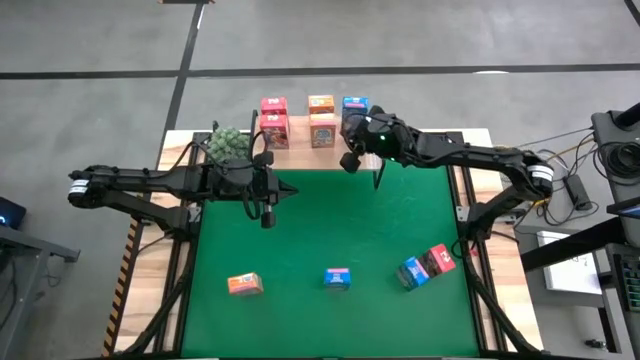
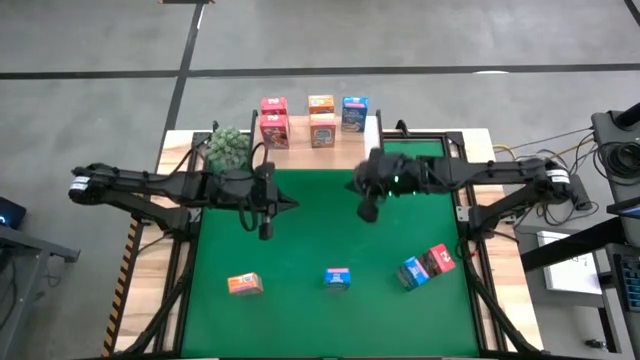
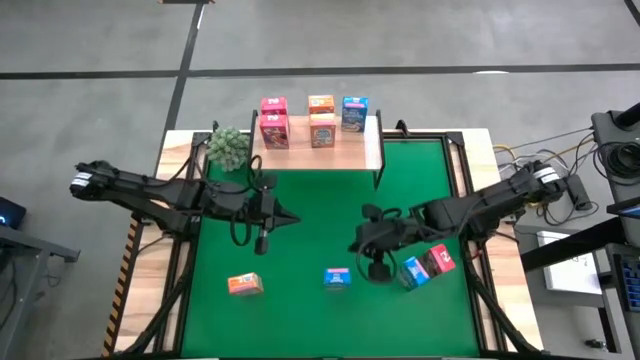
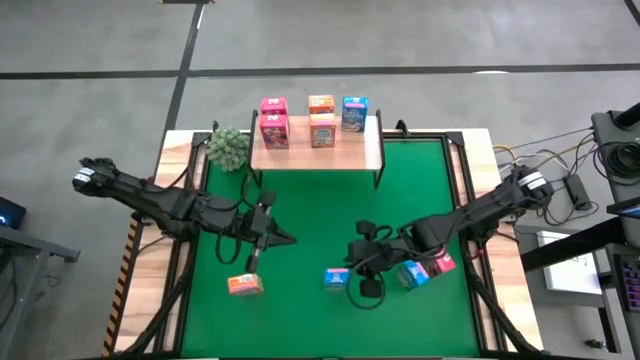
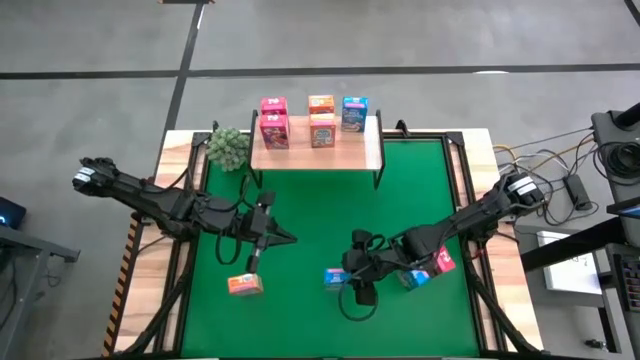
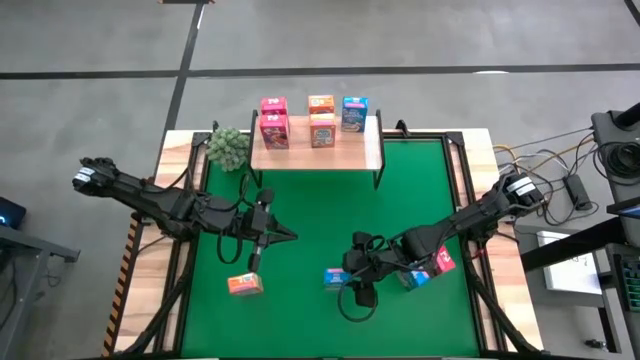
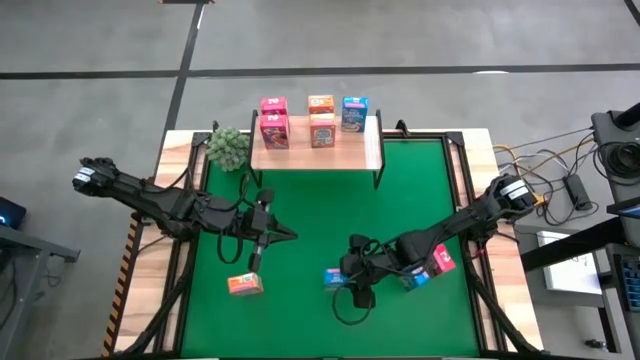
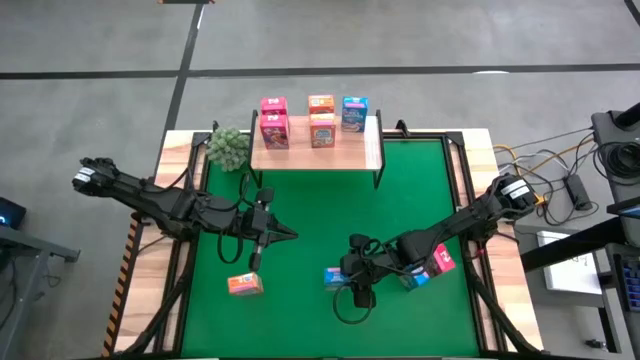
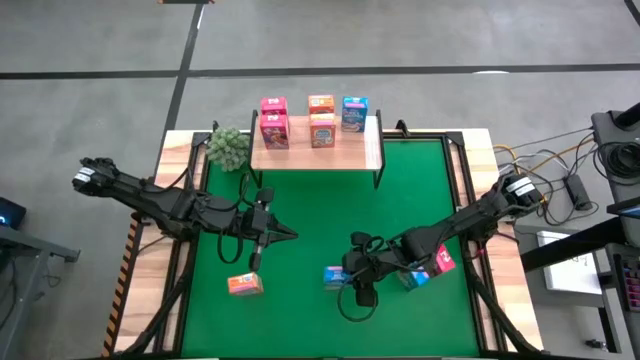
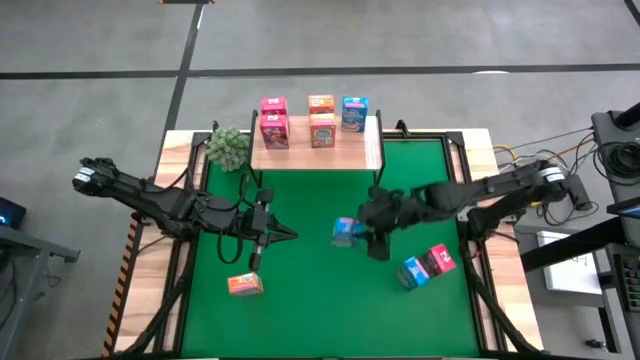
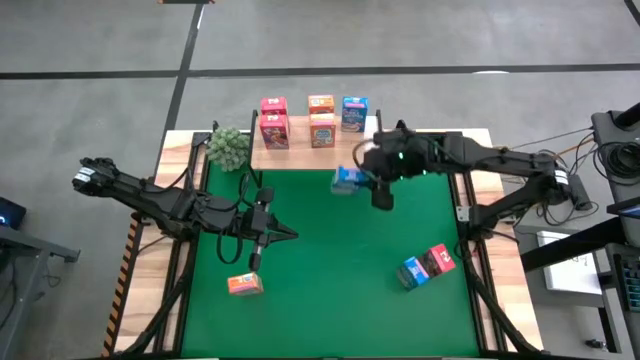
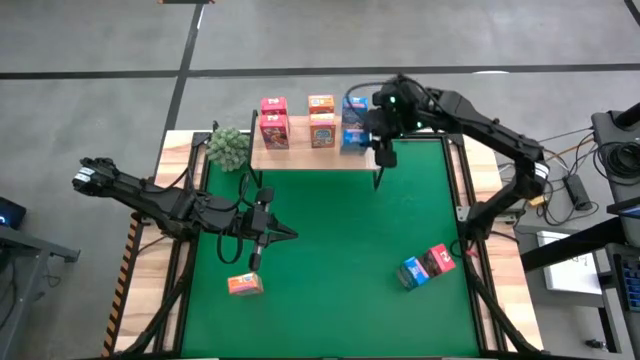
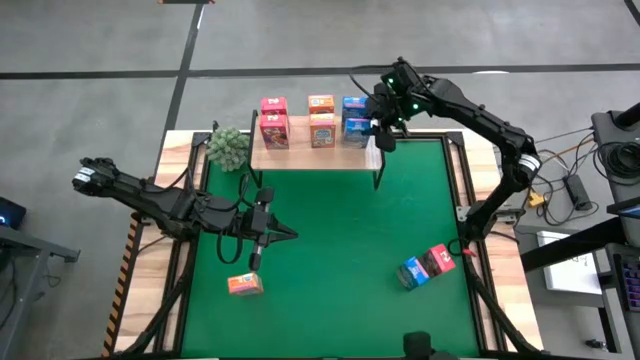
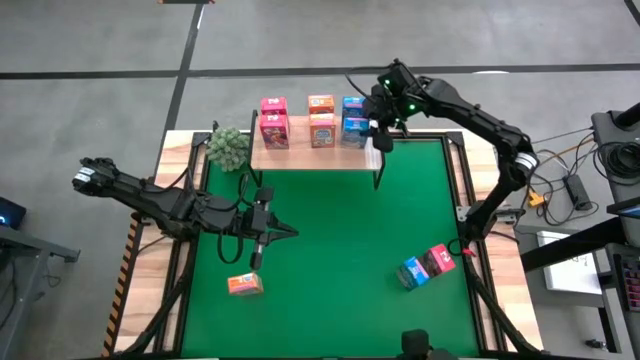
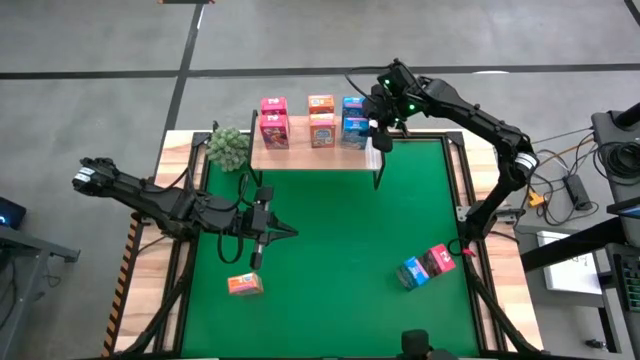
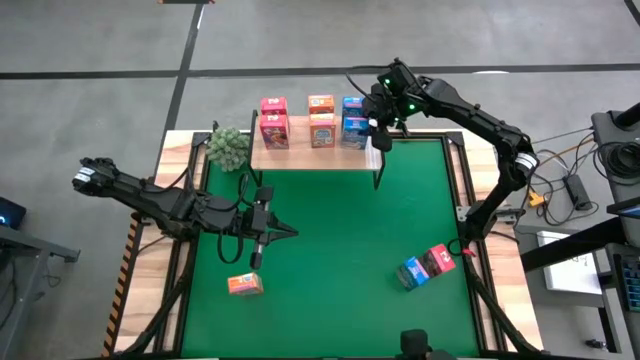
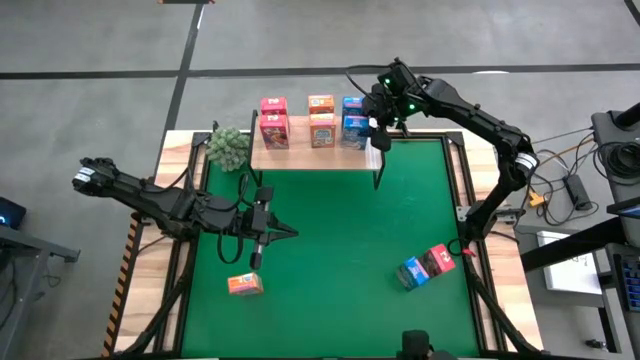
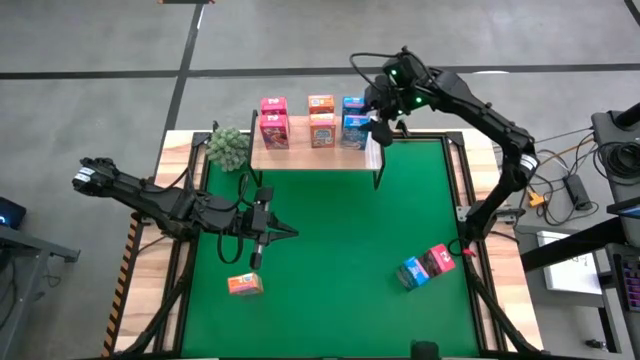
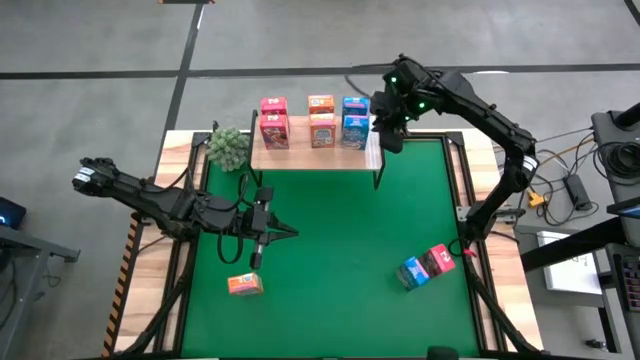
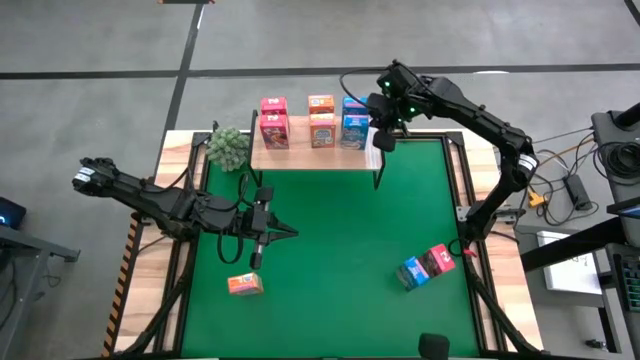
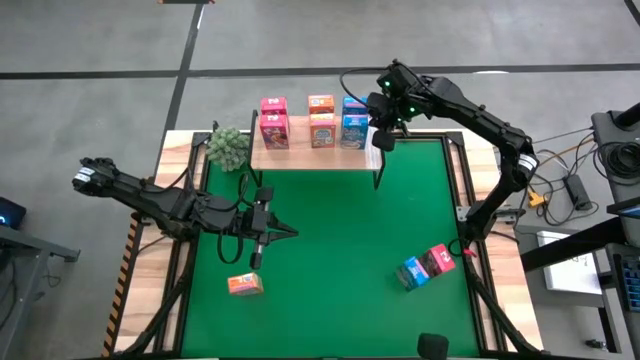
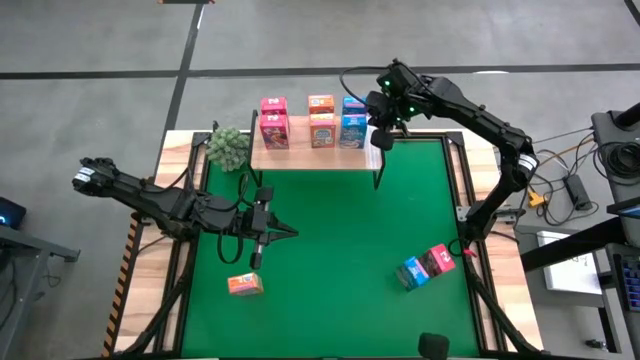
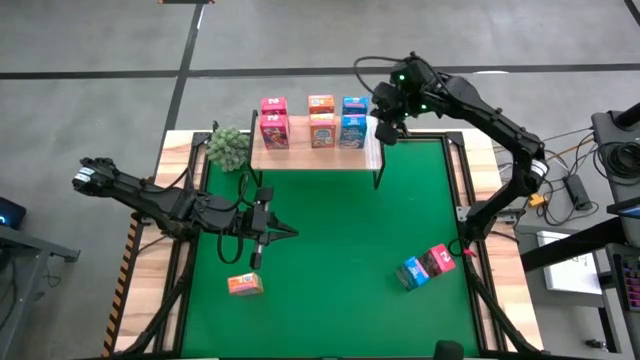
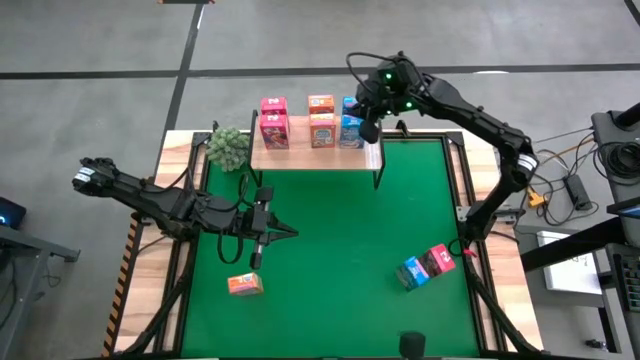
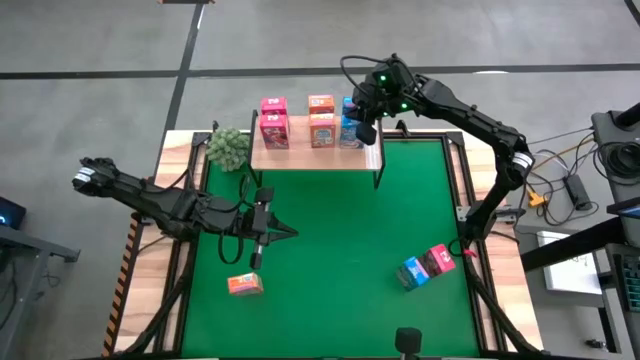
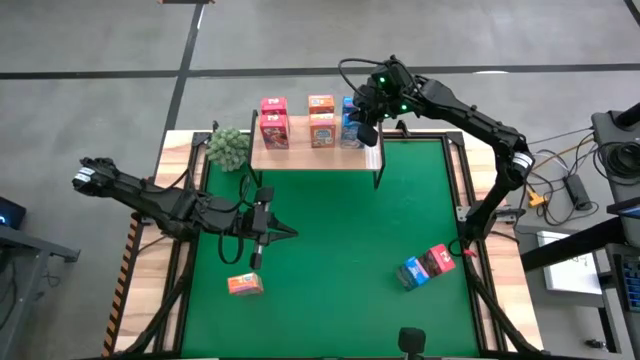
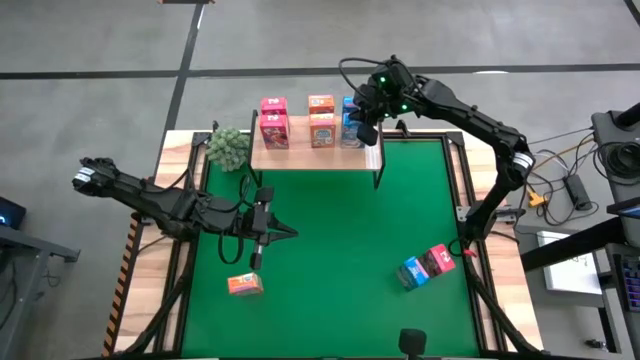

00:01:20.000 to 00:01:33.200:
Task: Stack cereal on shelf
Put the left blue cereal box on the shelf aligned with the other blue cereal box

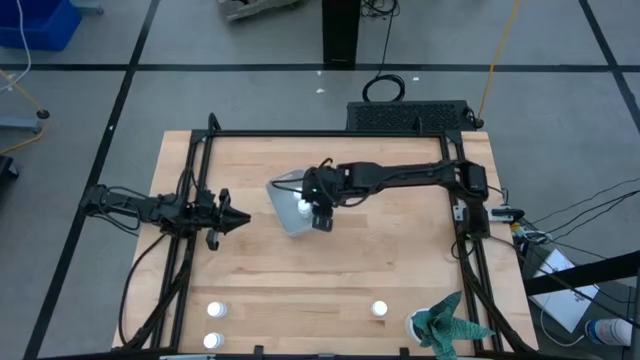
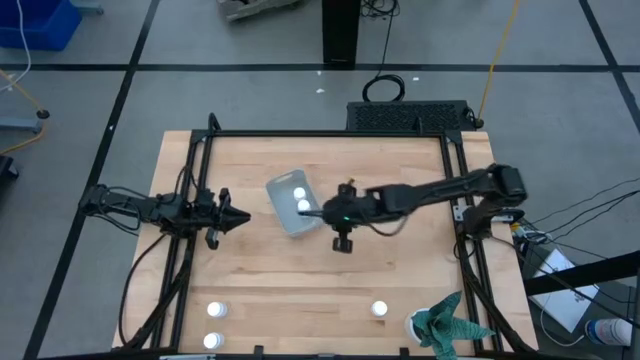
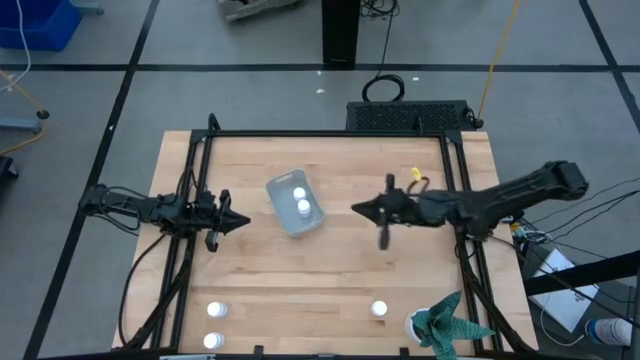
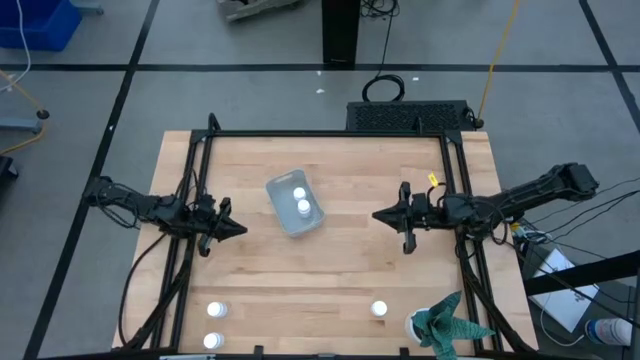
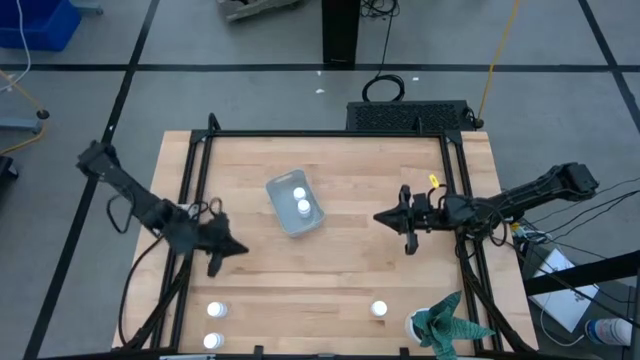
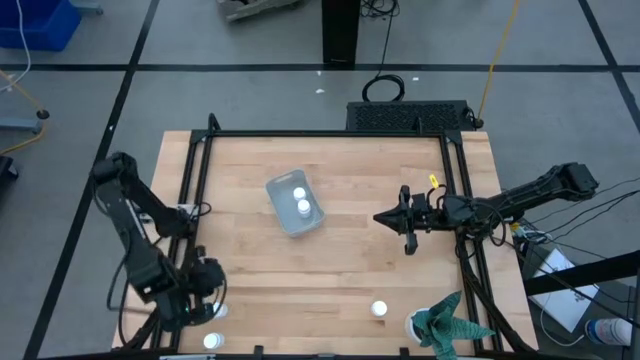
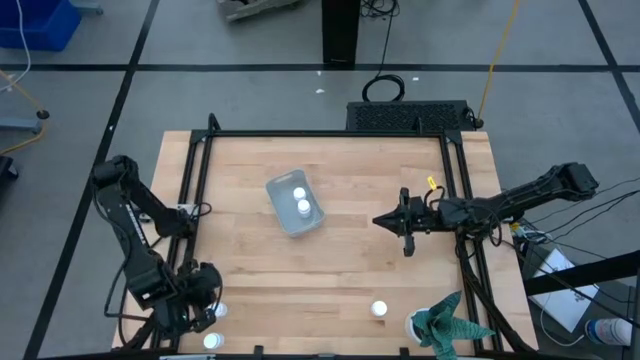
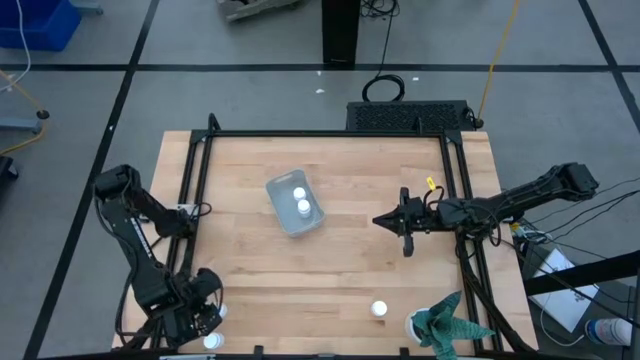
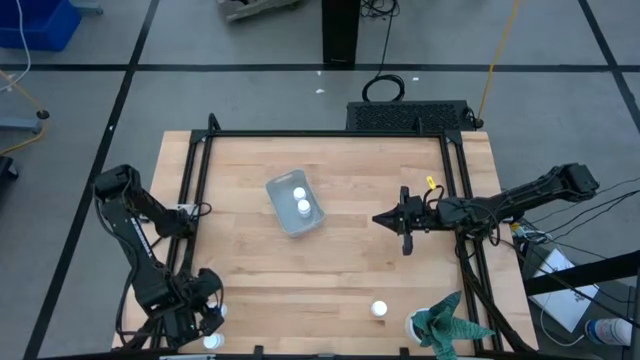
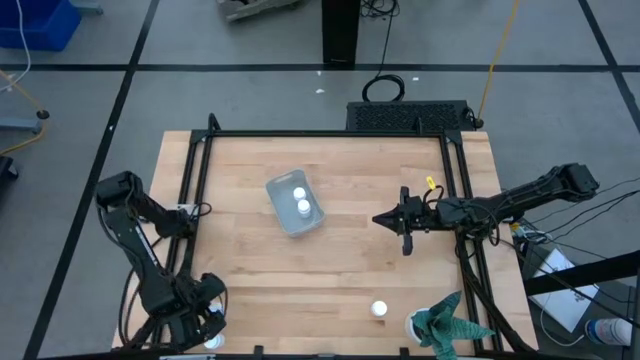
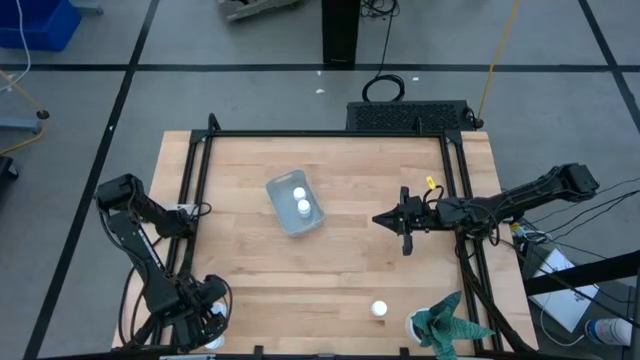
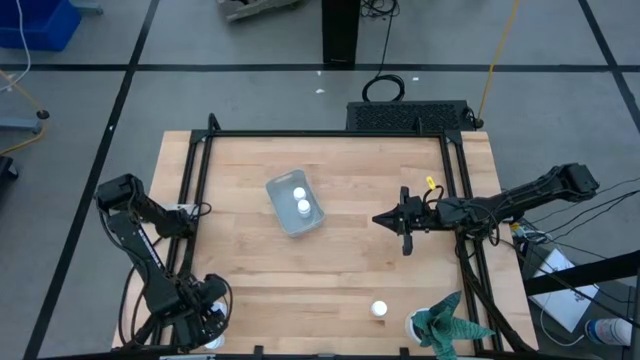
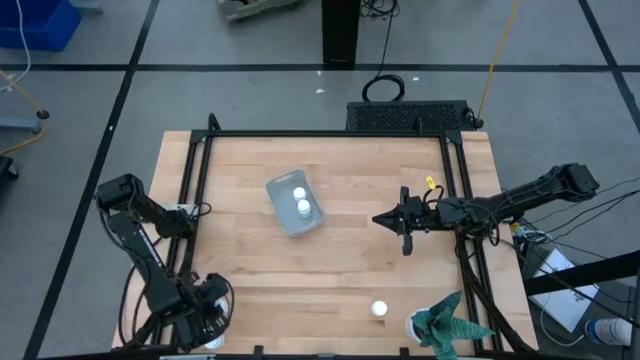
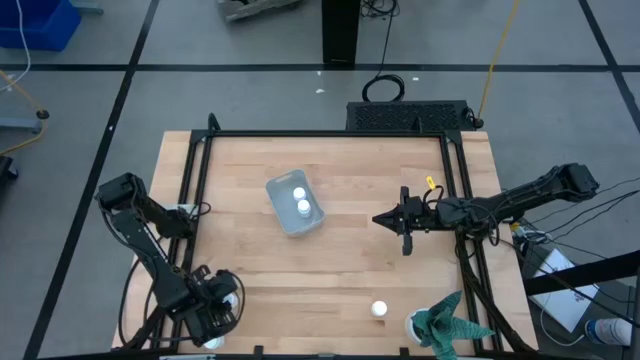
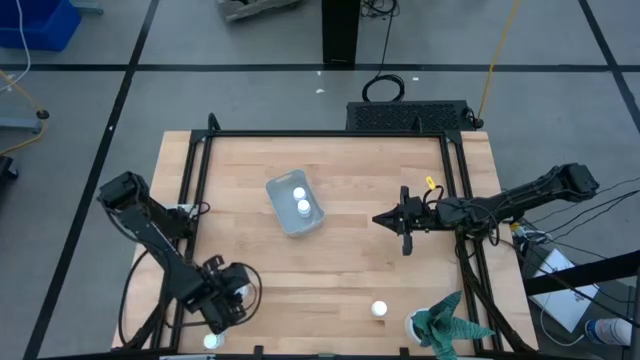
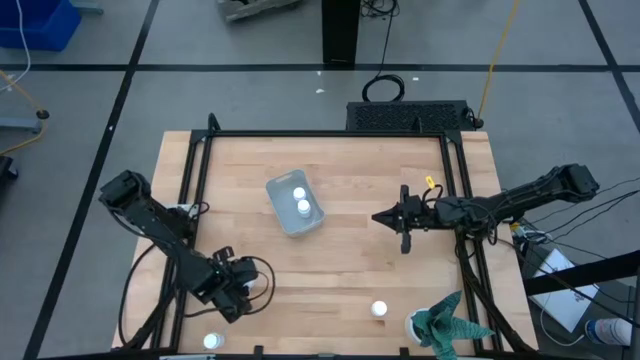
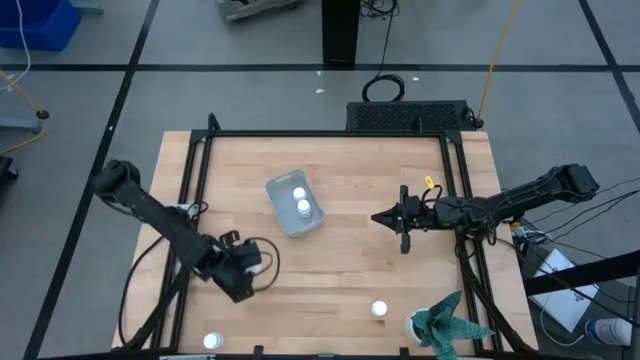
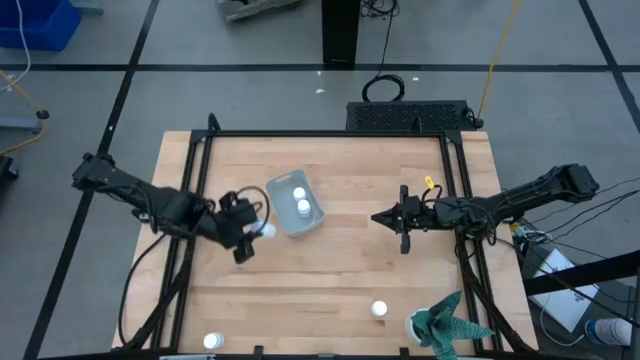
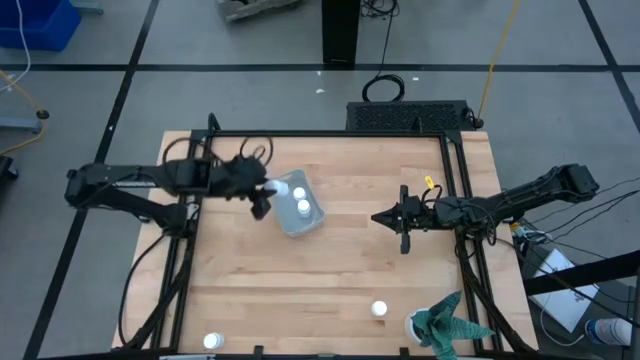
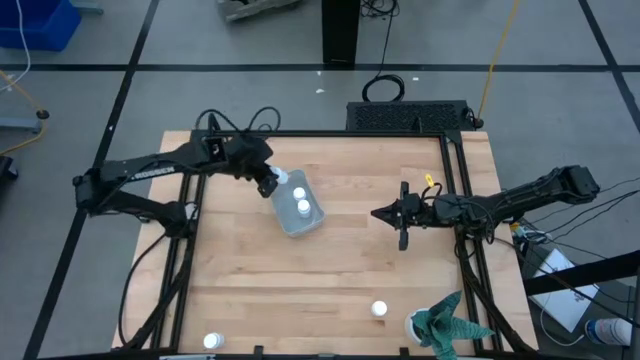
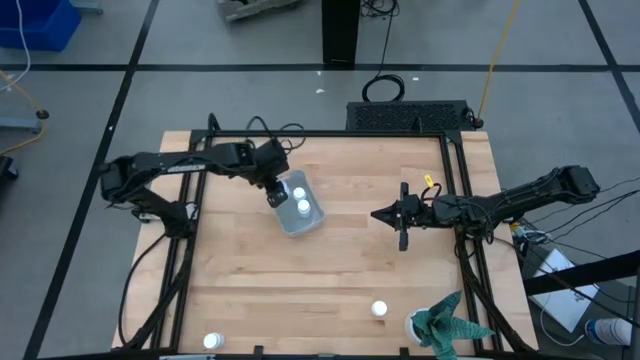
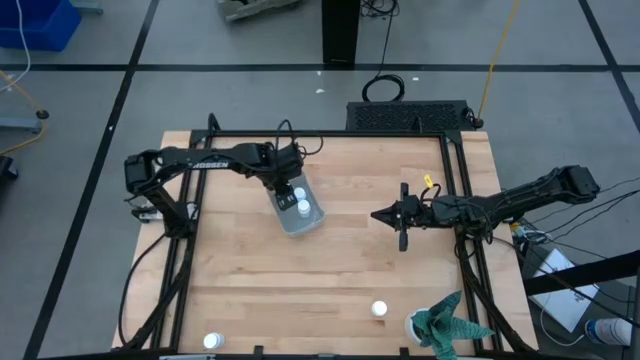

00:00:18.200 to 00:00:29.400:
Task: Pick and place pill bottles into a basket
Put the white pill bottle into the gray bin
